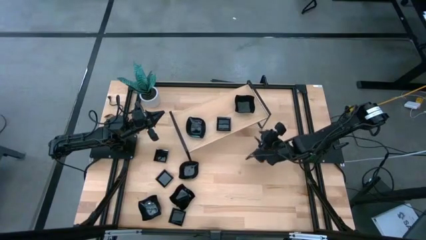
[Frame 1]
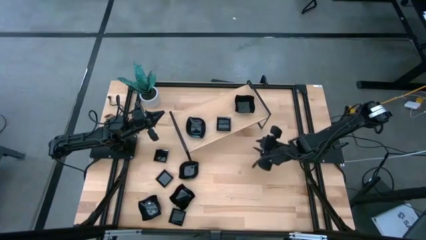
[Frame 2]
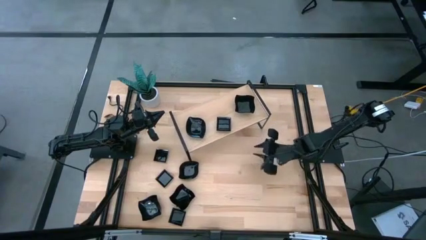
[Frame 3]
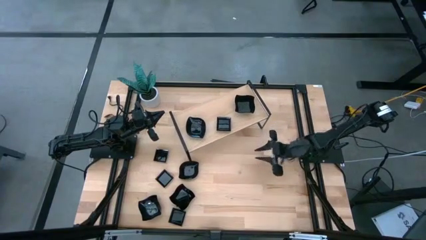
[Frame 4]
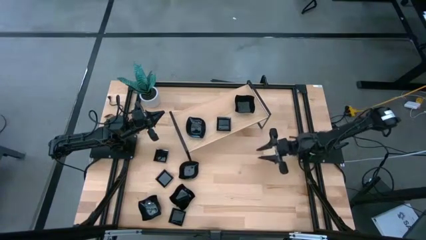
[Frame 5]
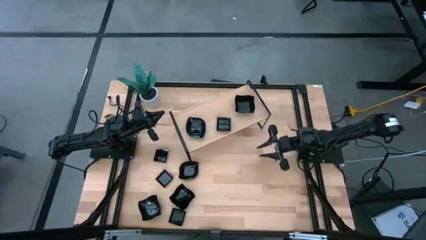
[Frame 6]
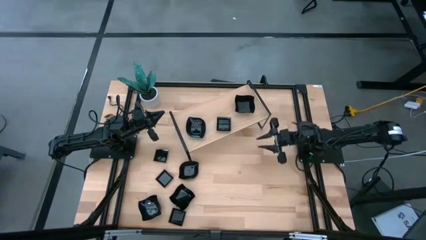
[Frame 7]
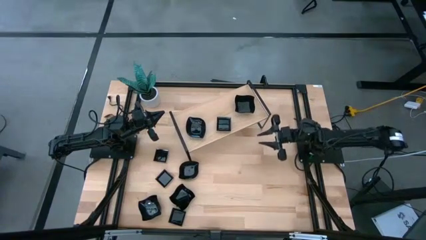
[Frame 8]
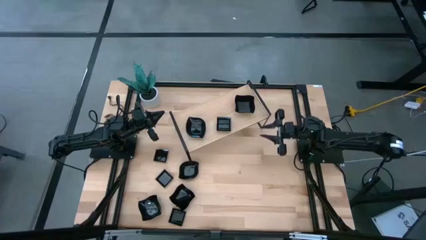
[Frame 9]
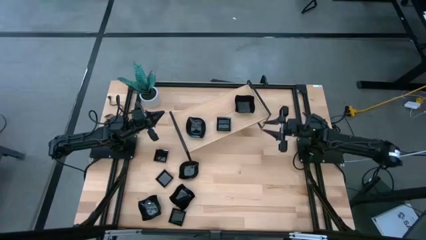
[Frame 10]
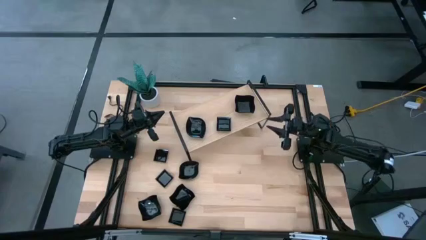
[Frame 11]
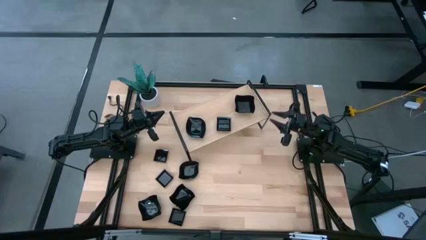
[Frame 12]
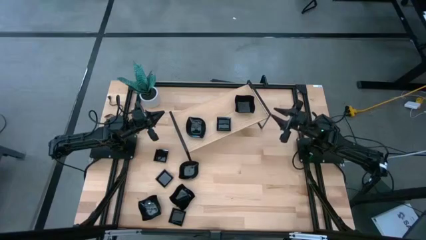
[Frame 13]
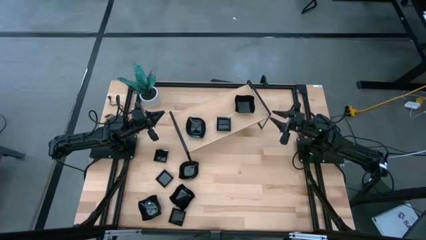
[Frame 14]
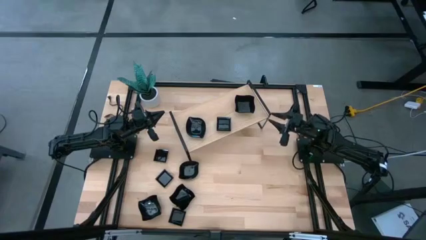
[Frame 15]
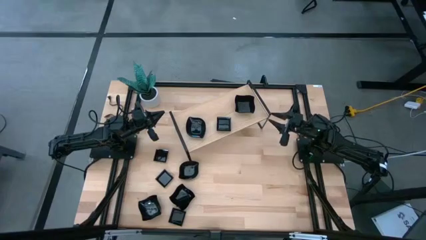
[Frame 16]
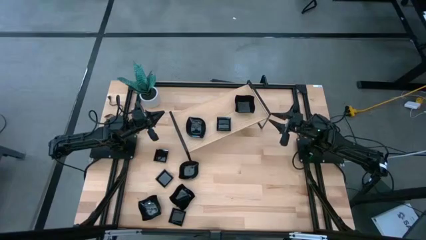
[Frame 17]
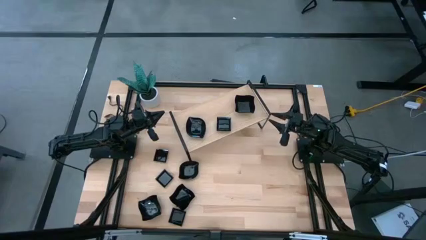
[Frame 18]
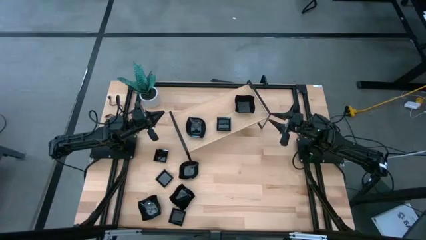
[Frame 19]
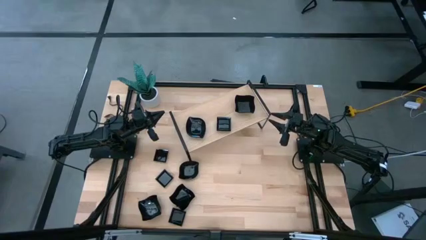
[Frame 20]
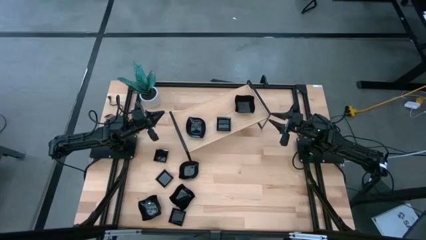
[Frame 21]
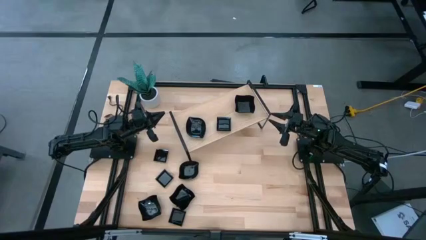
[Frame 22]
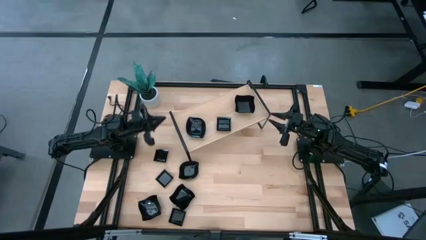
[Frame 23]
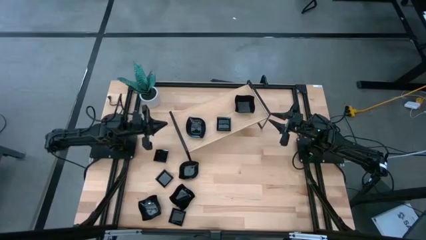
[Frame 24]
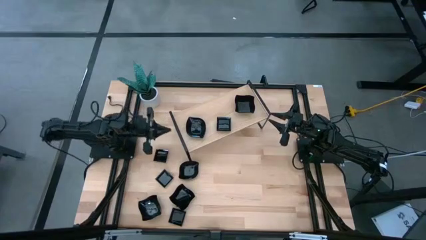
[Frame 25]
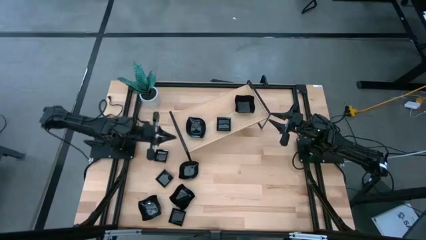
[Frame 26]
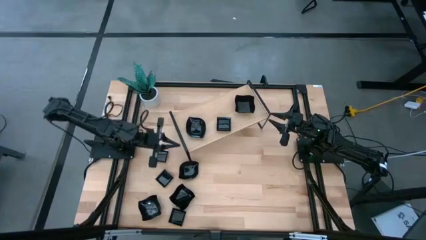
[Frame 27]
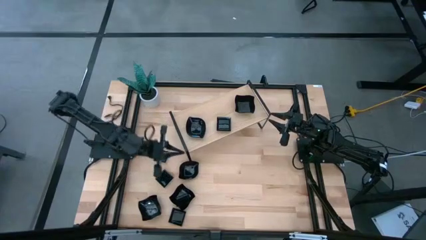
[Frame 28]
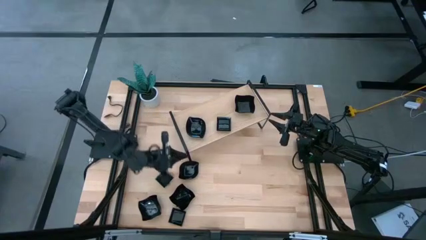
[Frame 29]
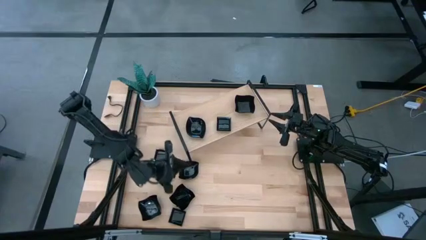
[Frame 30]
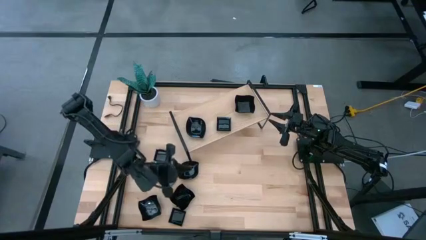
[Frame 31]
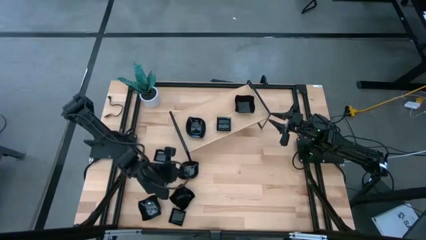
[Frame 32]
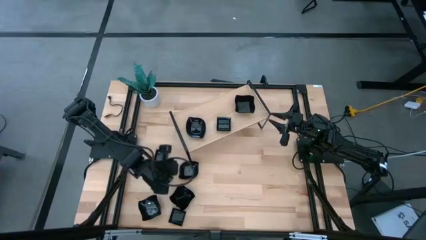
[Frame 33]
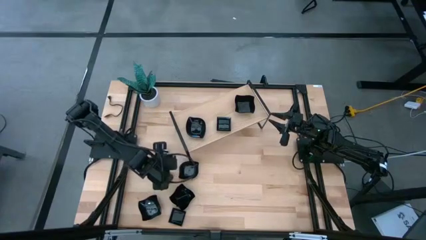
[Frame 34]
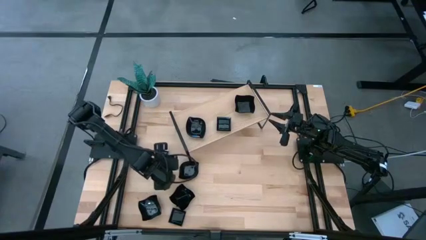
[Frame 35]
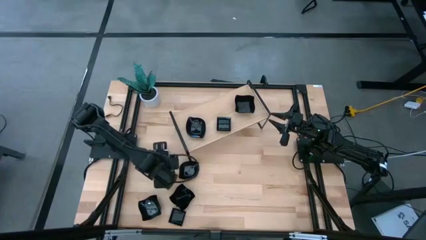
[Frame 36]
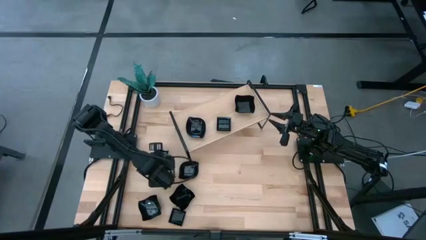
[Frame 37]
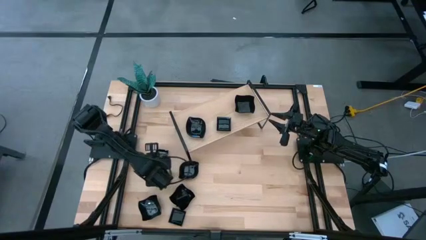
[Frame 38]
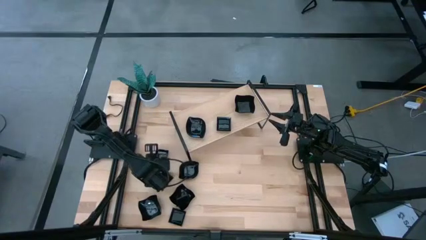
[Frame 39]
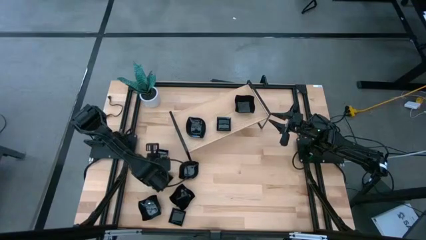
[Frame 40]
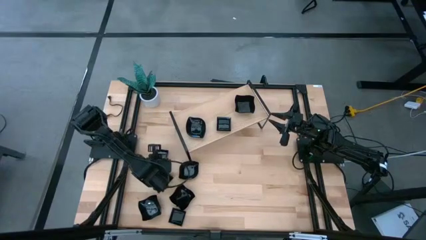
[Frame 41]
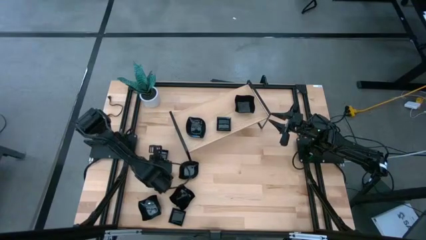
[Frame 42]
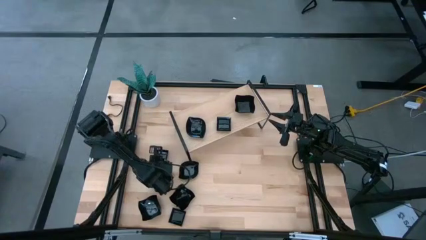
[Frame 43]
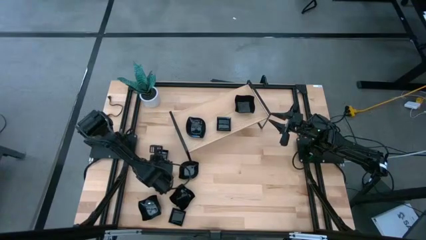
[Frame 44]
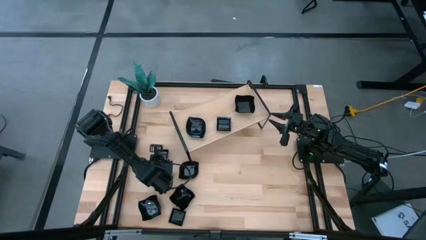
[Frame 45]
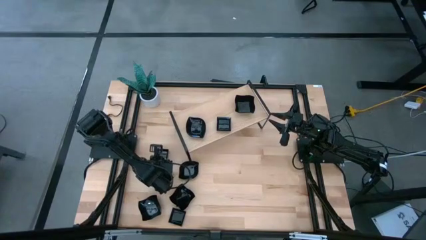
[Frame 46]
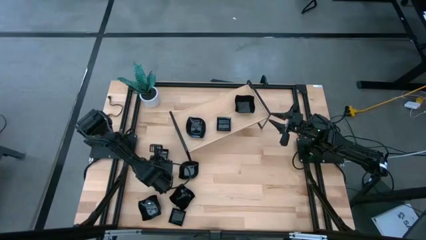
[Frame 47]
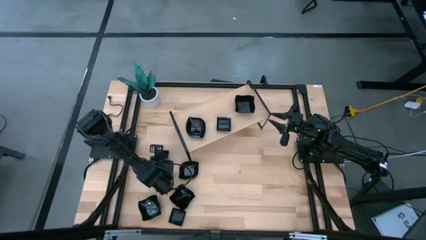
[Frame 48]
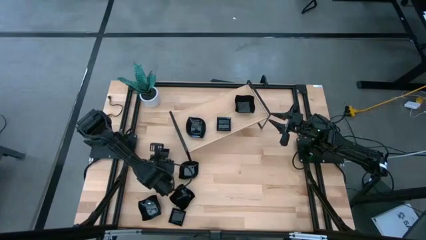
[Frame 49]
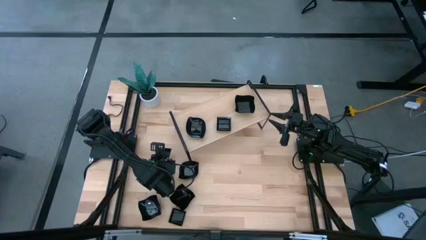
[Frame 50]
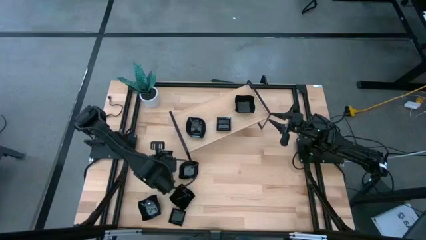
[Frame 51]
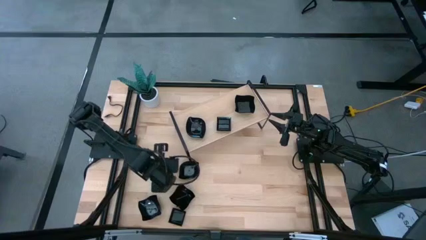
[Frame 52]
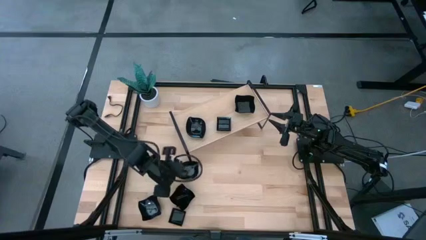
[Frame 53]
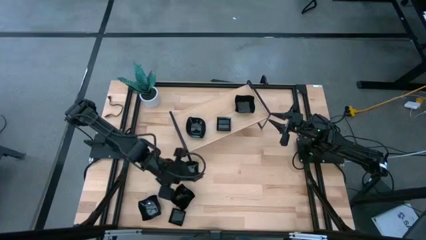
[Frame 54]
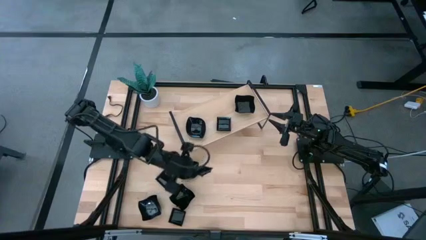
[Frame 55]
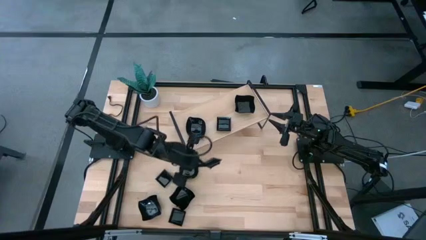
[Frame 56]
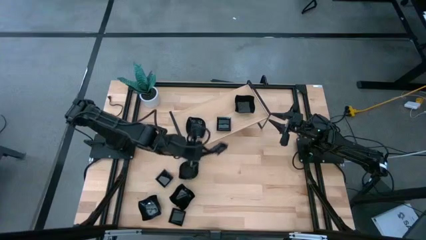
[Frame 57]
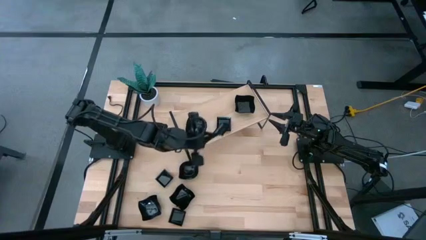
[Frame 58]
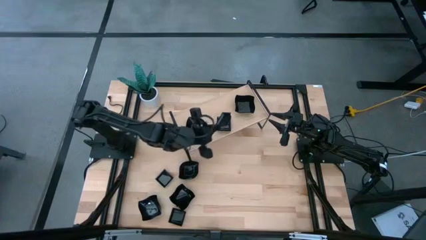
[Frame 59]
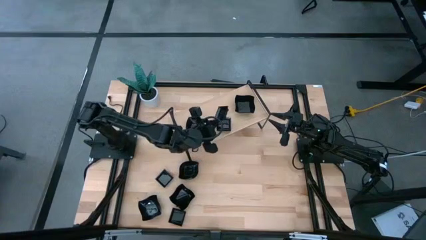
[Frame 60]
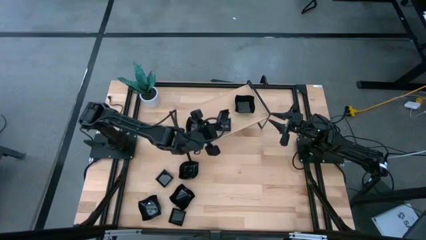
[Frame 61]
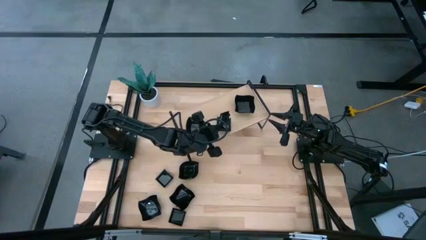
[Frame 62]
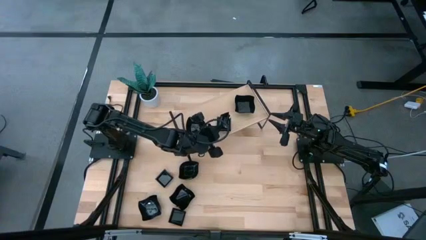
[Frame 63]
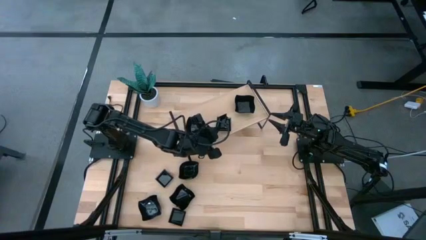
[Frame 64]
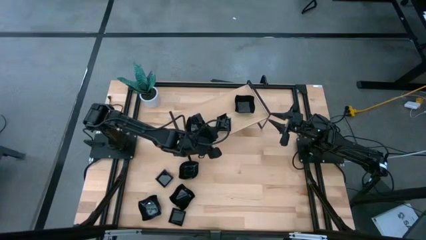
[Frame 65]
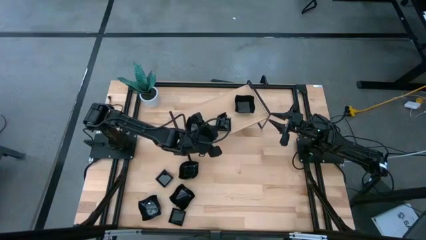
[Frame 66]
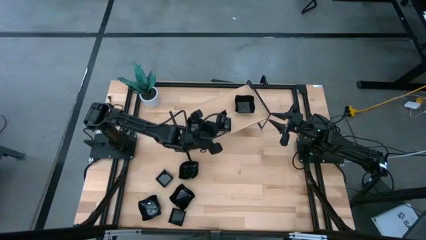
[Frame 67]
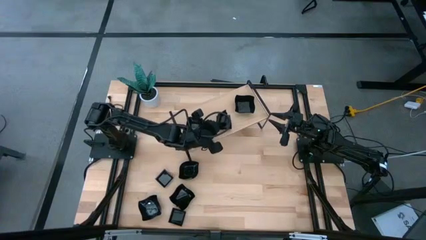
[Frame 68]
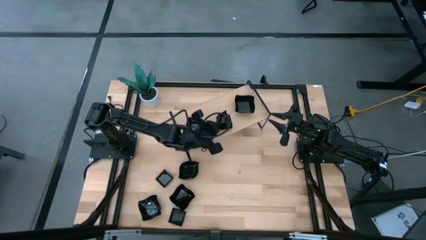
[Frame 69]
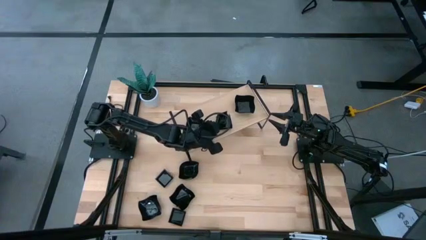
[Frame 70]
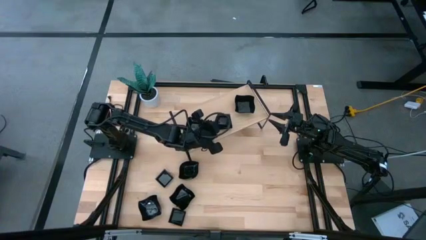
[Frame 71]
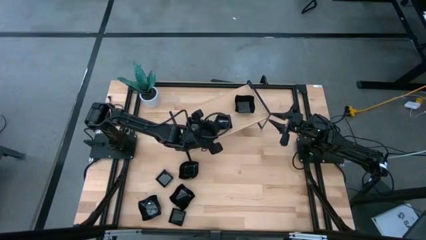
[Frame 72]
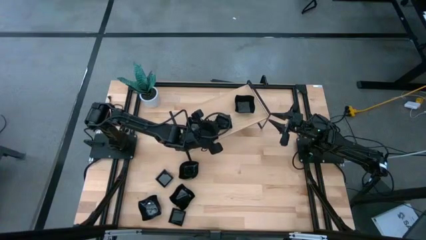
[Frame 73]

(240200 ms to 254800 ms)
Task: Pick & Place Mini shaped plates
Stack the black square plate on top of the black square plate on the shelf

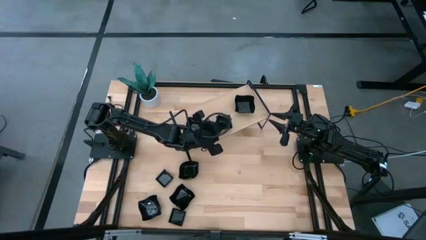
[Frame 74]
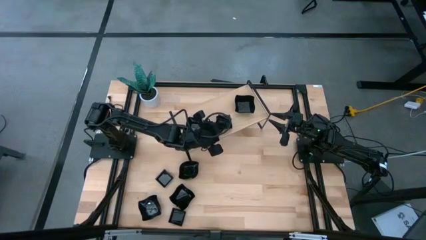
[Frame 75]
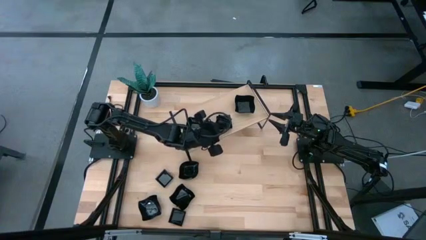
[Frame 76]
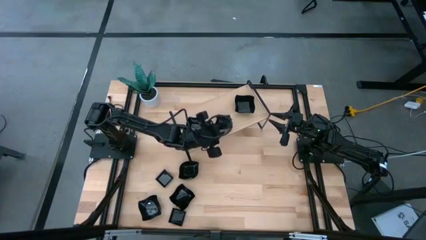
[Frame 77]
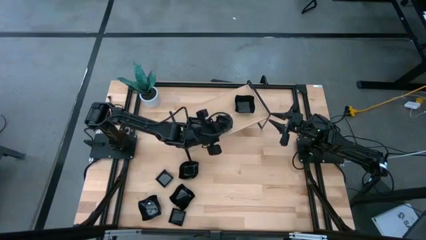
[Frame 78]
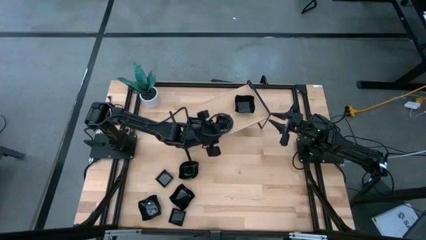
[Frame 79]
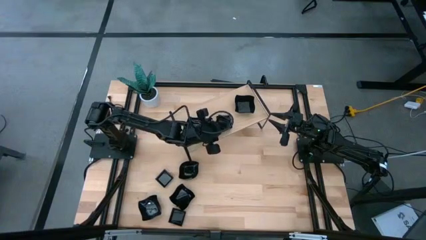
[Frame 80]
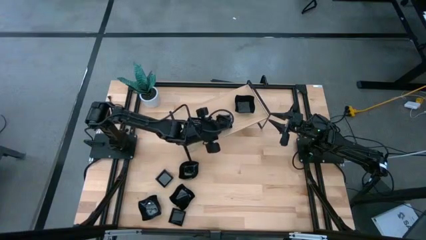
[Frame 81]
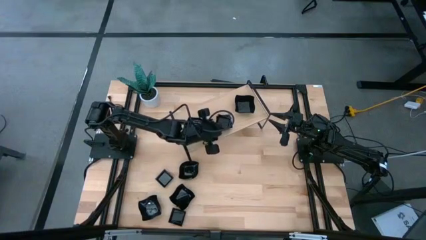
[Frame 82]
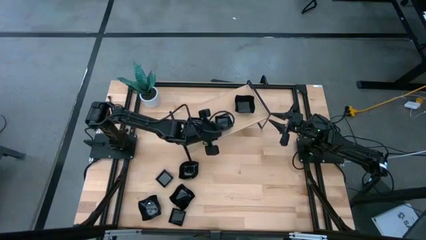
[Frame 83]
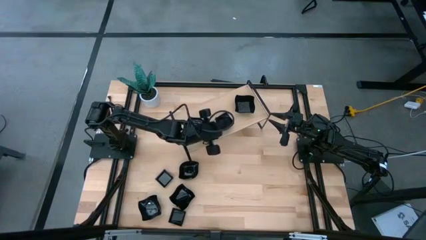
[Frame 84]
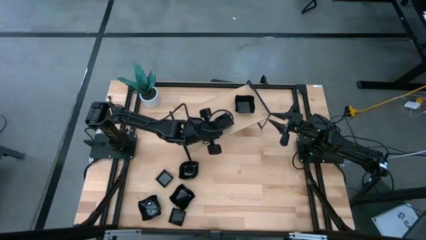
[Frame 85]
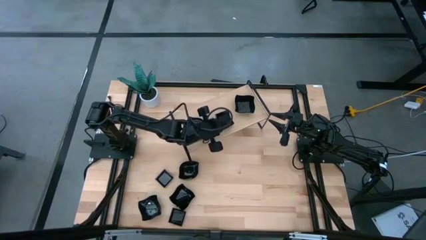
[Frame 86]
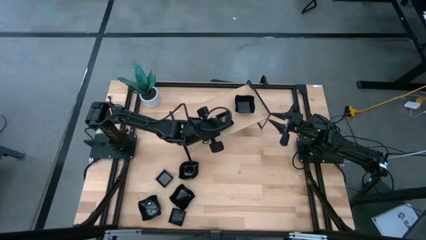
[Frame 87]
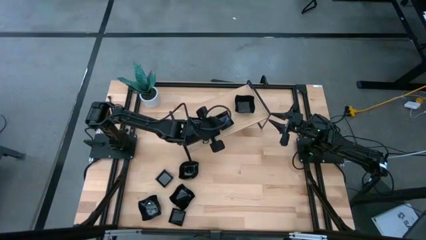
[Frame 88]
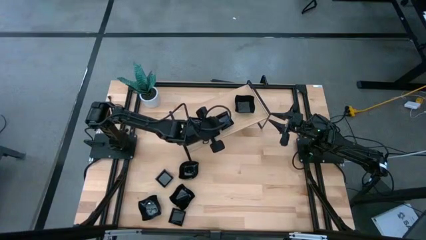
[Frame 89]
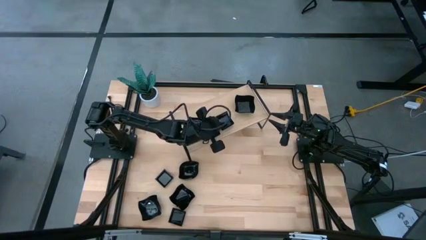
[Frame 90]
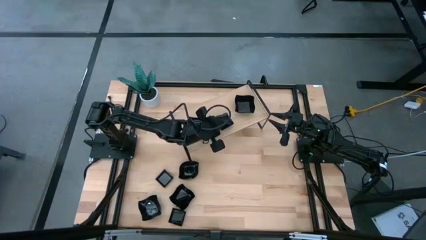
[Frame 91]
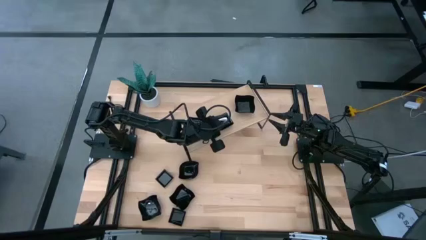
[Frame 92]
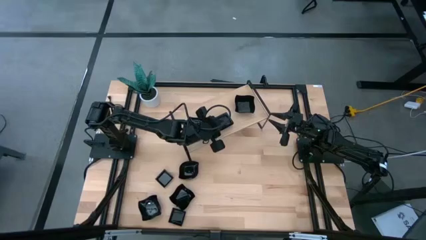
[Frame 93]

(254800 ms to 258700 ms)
Stack the black square plate on top of the black square plate on the shelf
